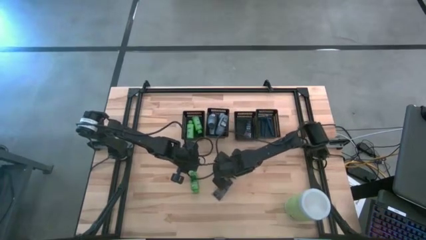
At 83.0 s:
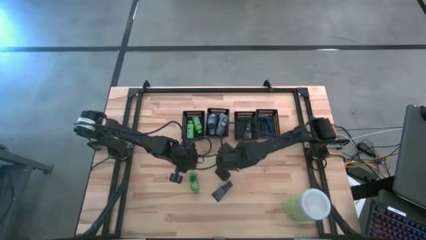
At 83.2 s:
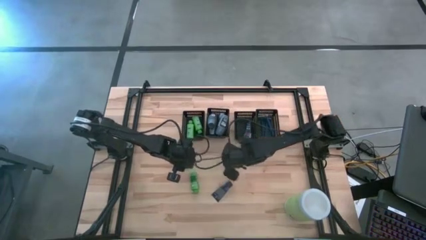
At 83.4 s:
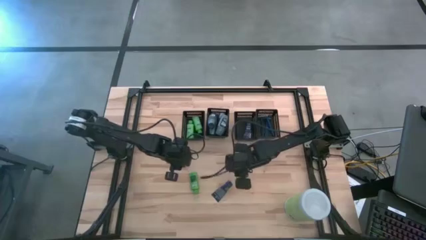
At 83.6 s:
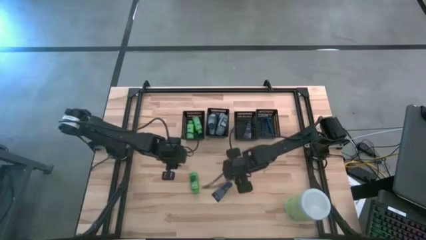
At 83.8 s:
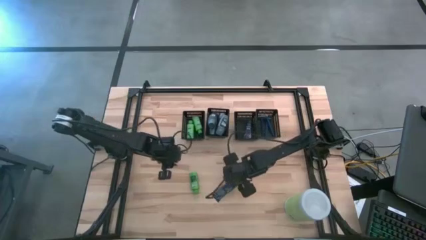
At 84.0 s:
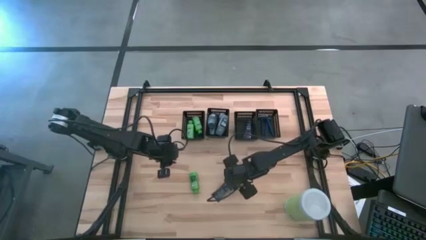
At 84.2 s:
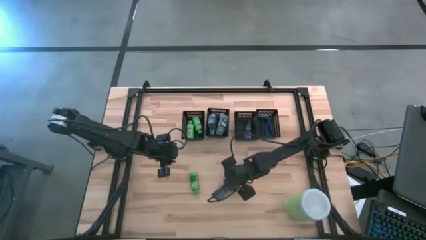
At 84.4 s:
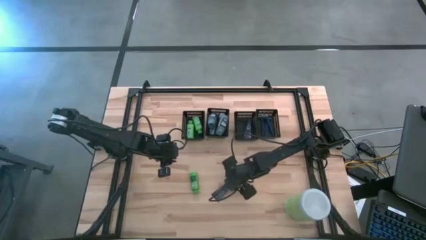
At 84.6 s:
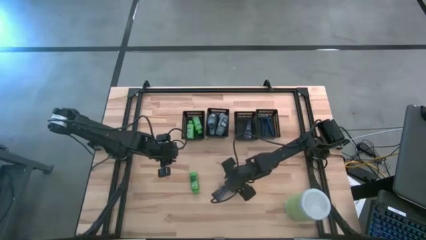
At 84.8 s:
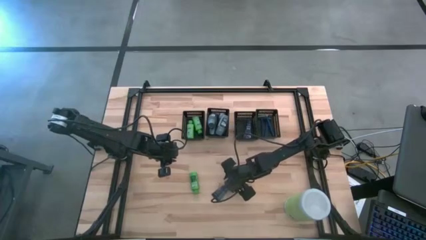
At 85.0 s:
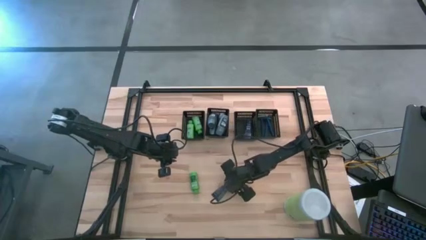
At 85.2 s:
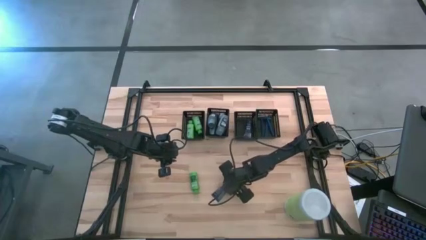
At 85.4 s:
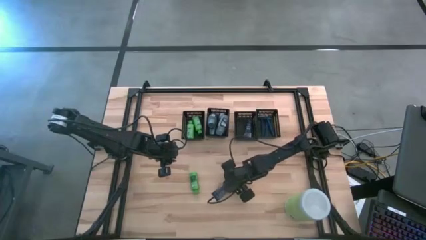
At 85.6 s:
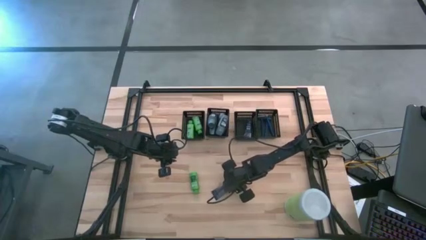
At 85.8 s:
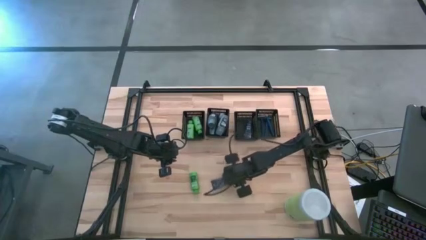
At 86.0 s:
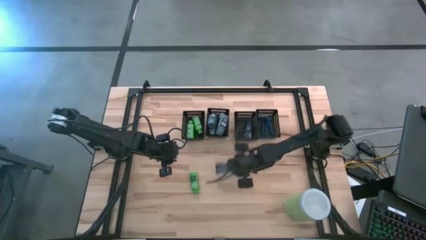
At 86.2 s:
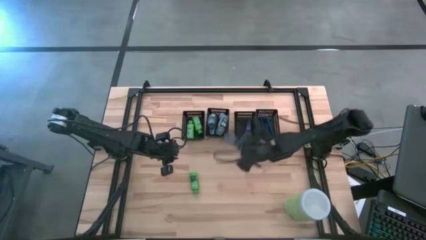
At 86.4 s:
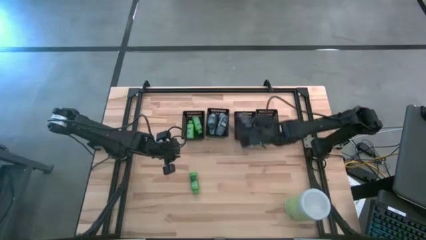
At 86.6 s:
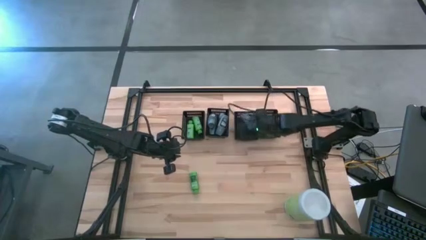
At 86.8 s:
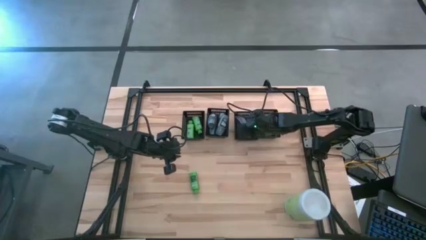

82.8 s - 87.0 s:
Task: Pick & Place Travel size toiletries
Put the shave cream into the center right black basket

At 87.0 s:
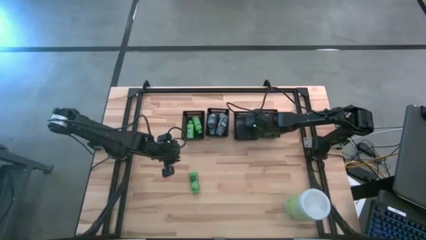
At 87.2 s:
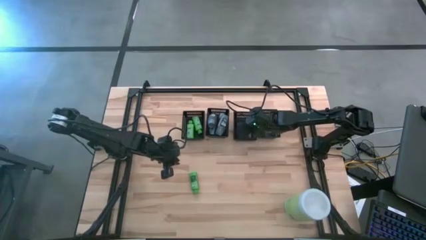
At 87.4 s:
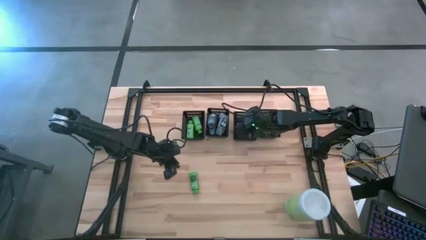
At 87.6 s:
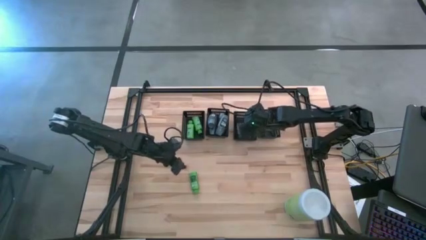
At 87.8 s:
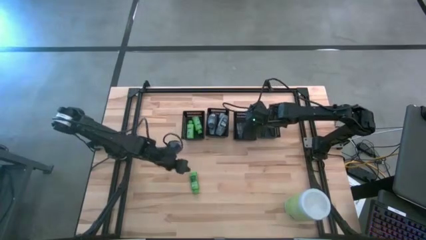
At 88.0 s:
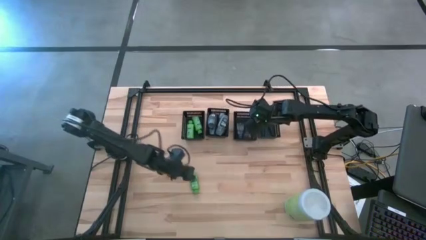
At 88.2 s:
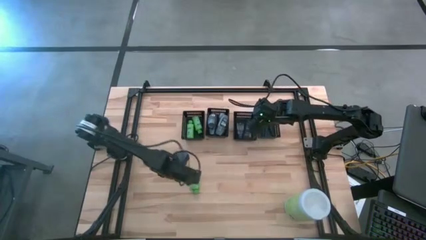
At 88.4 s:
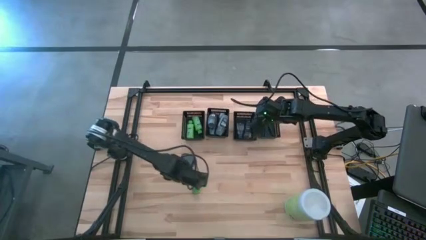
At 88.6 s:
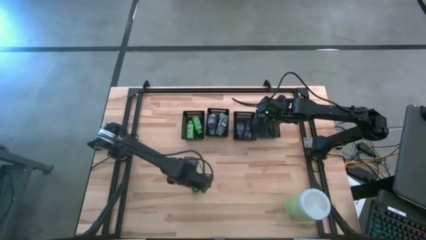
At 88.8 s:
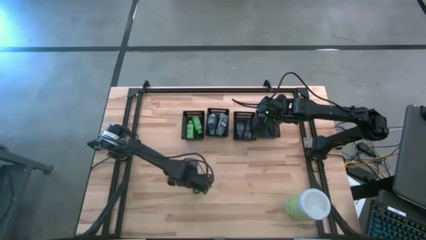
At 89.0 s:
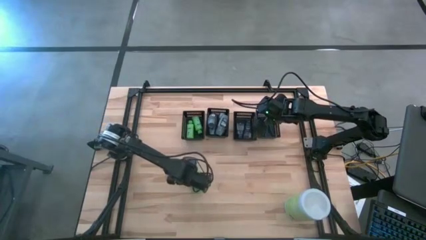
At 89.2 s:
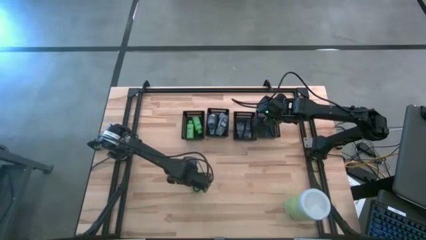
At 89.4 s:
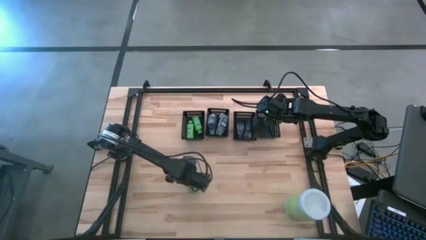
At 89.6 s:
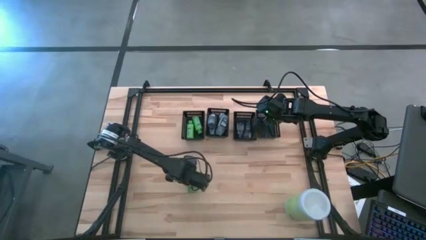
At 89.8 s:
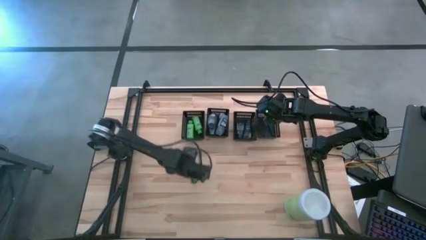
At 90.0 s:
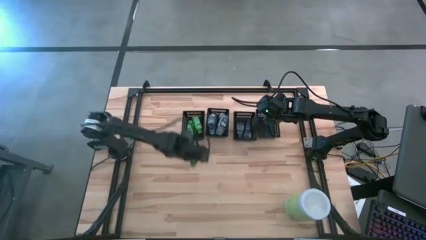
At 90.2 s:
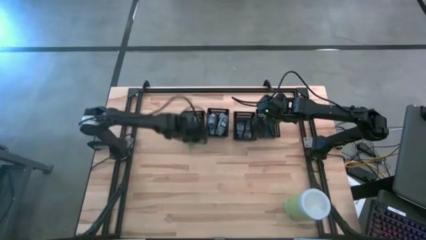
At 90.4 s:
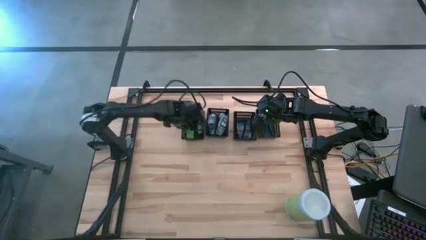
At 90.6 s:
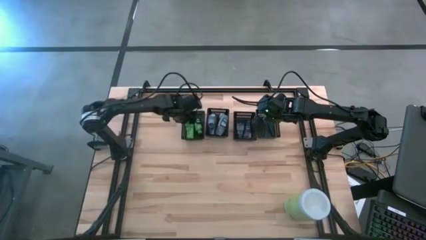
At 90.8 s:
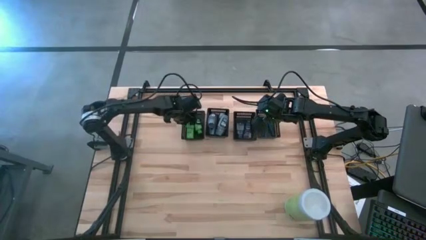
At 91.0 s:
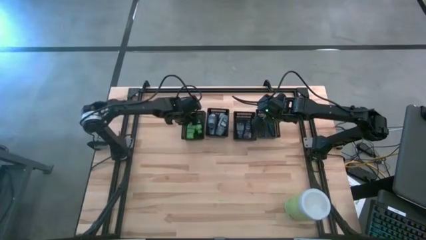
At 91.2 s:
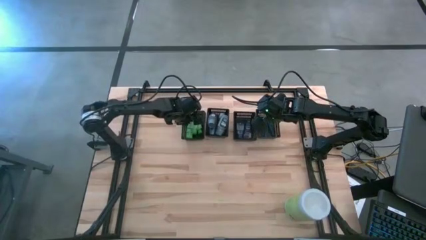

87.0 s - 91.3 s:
Put the shampoo into the left black basket

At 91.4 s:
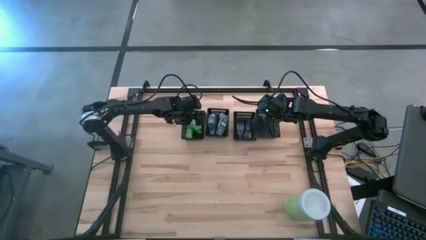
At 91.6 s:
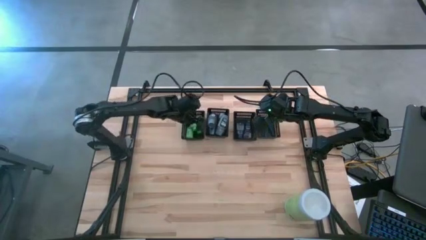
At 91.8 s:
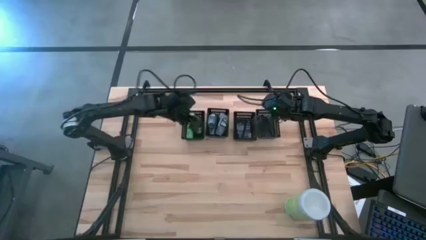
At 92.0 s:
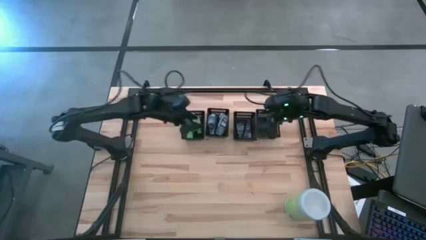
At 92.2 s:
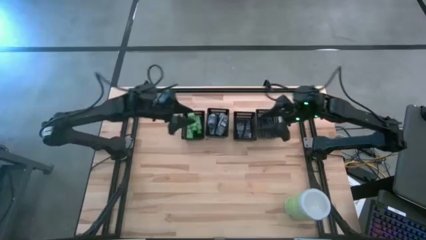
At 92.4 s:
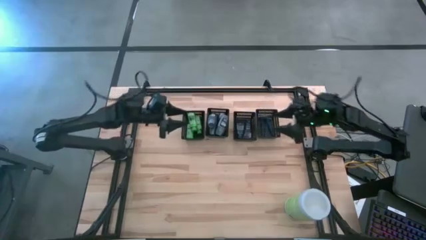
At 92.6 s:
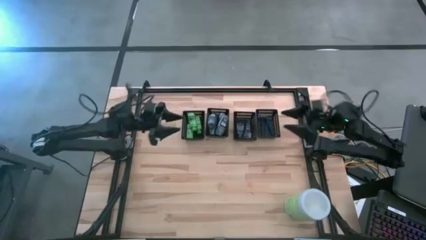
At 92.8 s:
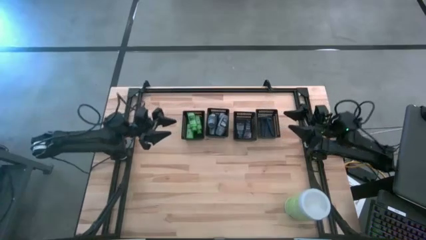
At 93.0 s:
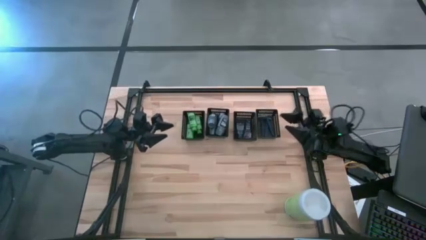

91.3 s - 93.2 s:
Return to Home Position

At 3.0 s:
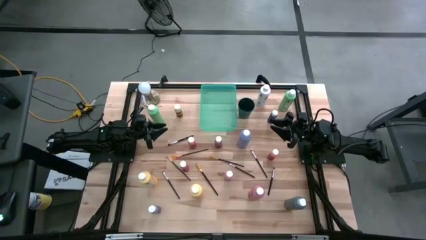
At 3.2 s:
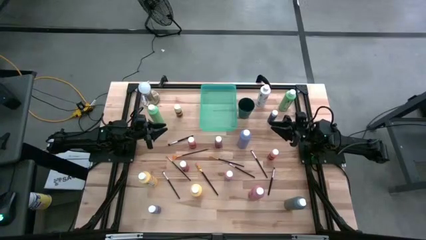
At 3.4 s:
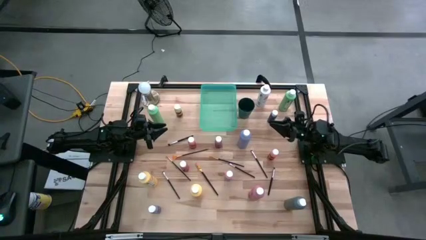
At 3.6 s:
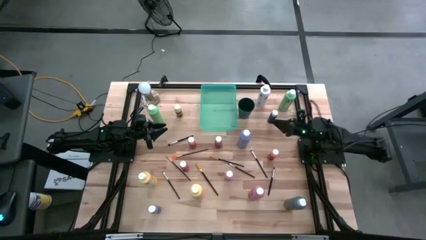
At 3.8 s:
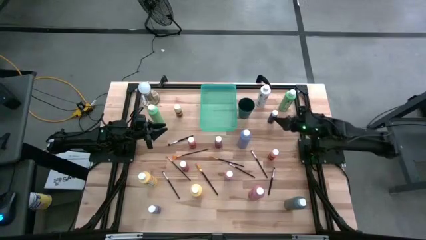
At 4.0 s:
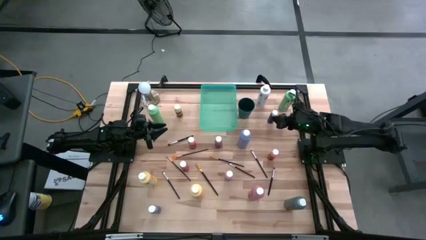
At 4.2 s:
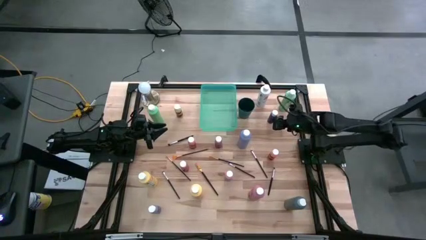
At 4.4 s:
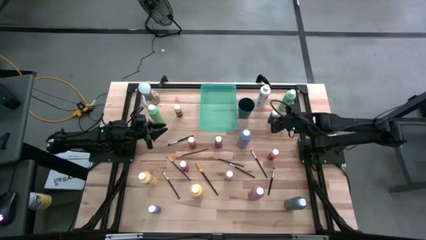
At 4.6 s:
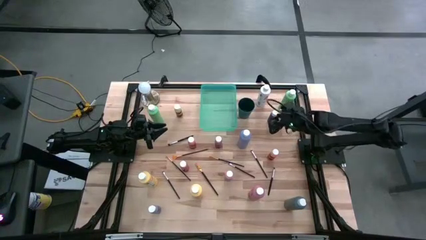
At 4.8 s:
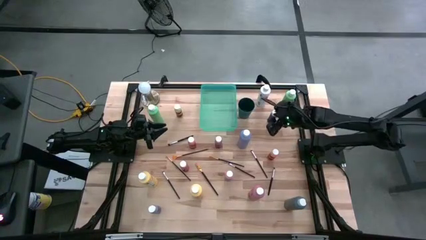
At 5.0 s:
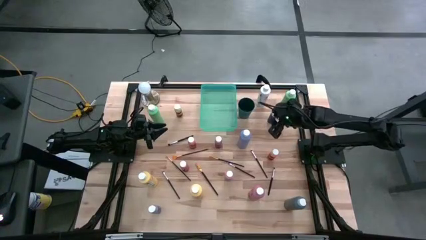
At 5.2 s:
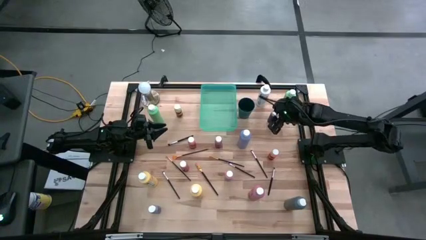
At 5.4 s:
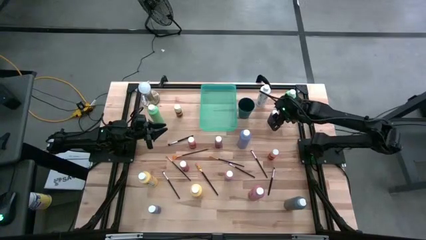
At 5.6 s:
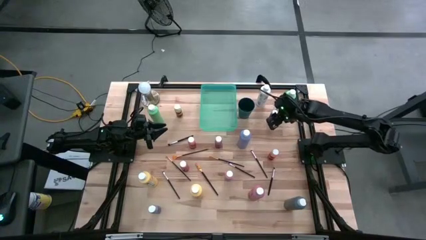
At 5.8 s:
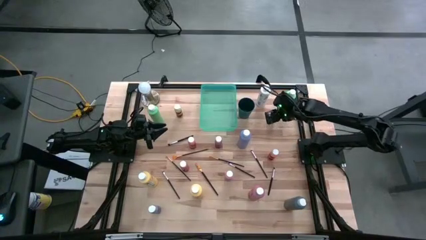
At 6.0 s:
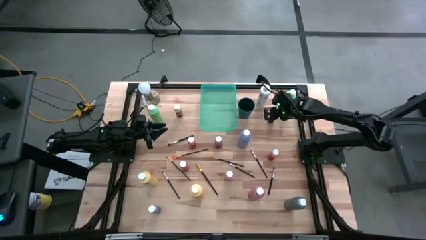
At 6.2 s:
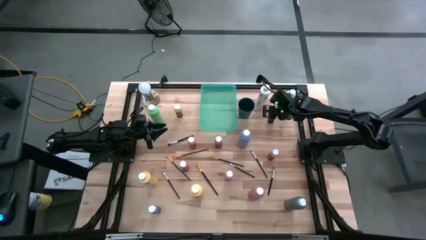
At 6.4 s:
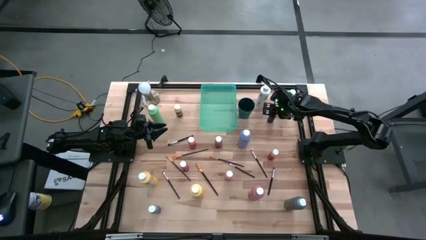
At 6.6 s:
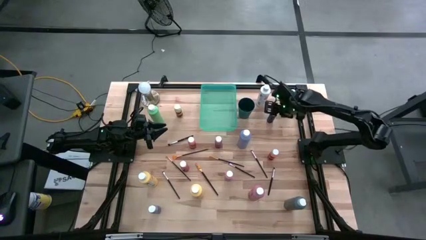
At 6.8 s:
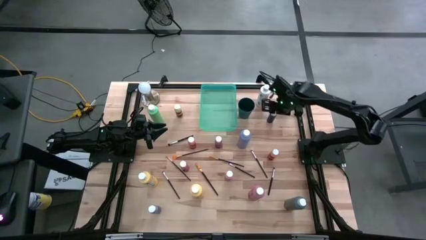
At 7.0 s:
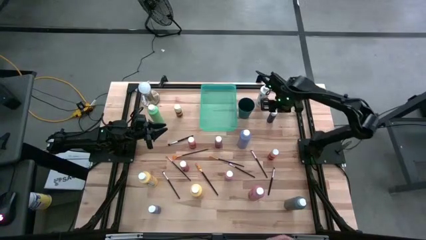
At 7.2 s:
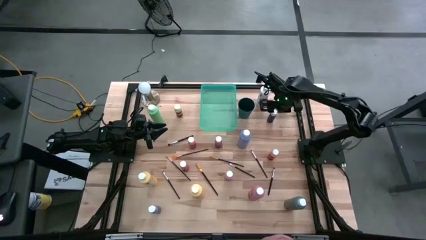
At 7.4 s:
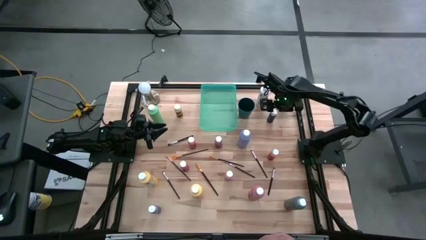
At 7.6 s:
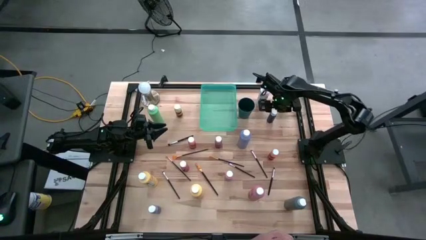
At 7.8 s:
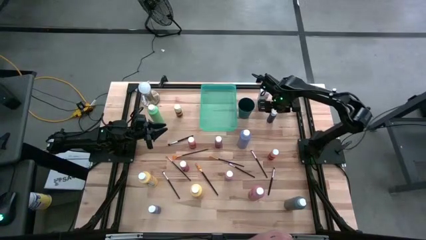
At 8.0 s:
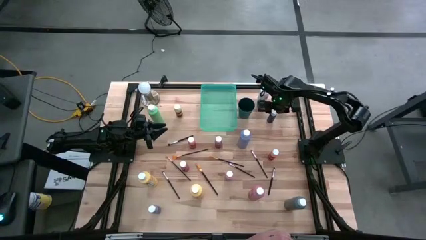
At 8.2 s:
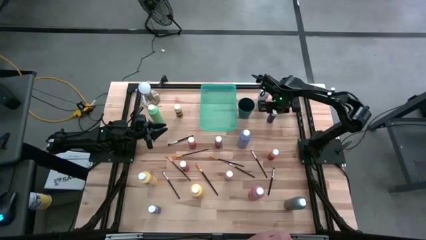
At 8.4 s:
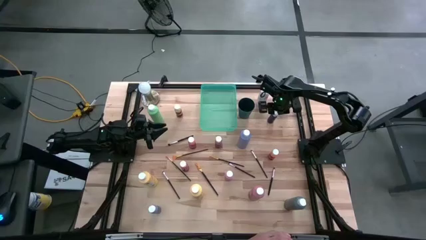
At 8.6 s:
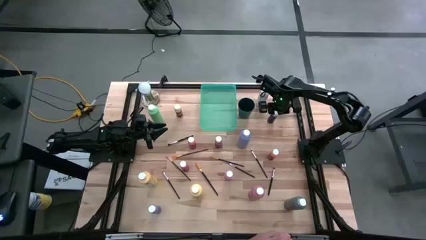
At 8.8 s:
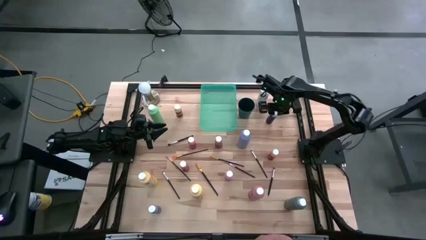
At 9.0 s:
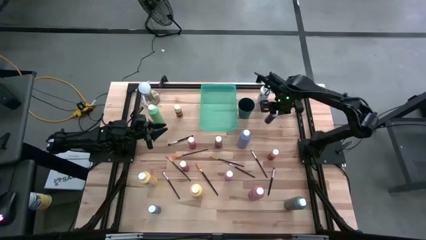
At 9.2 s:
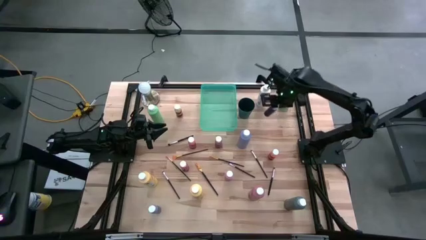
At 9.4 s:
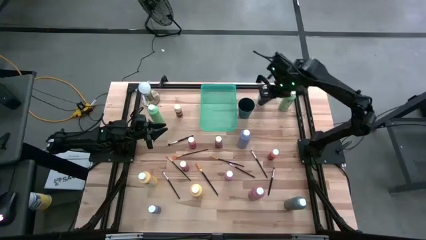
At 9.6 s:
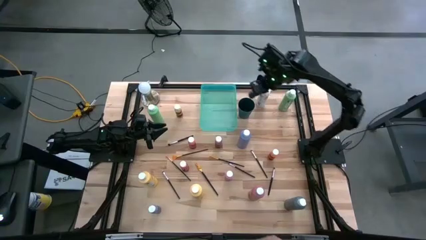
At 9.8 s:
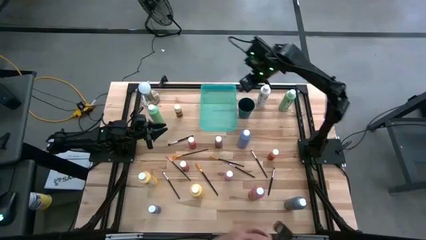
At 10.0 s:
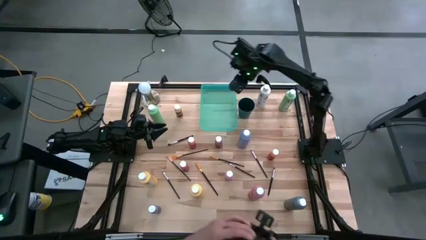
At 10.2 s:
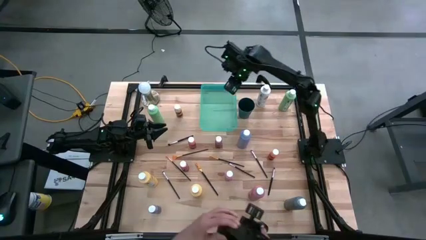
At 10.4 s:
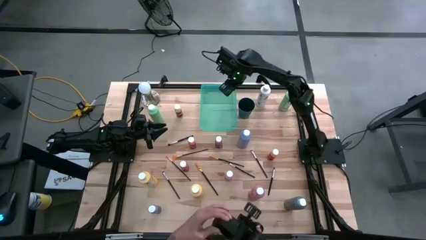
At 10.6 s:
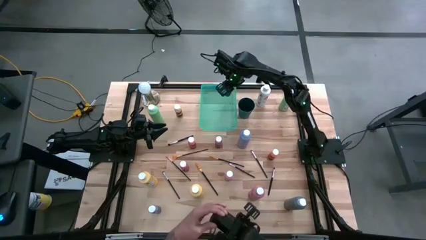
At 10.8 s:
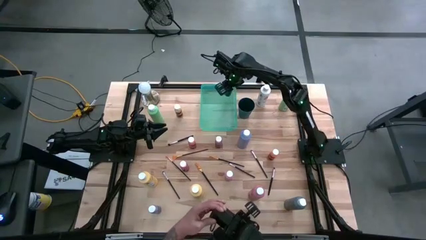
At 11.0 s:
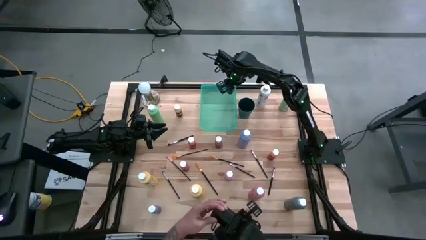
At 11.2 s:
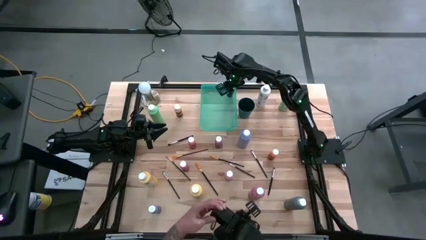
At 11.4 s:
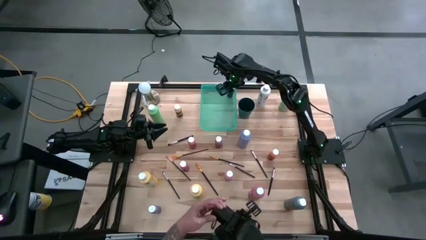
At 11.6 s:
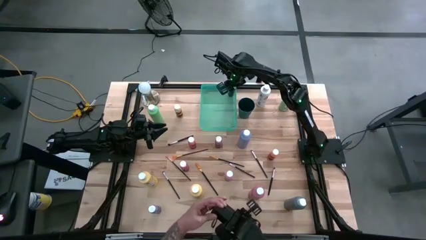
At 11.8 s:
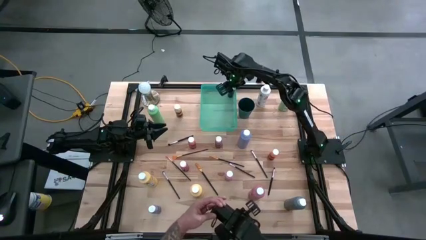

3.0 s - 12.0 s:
Task: Pick & Place Paint Supplies
Put the blue paint bottle into the green bin
